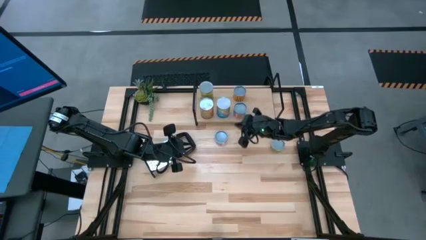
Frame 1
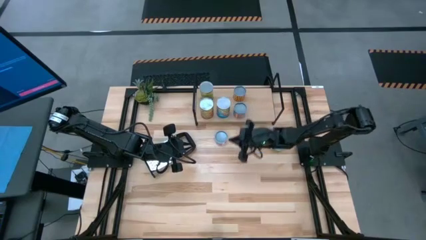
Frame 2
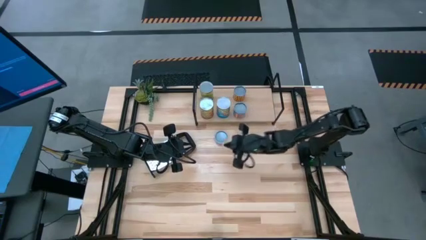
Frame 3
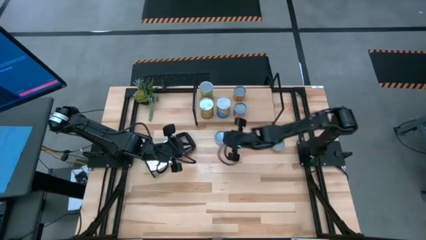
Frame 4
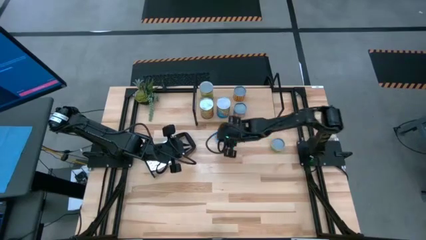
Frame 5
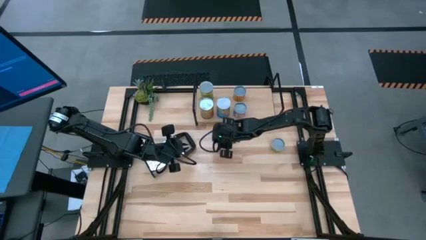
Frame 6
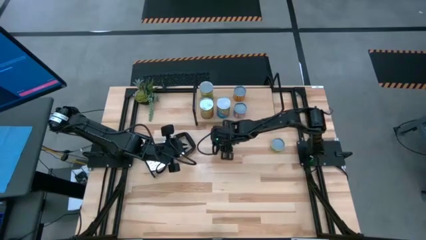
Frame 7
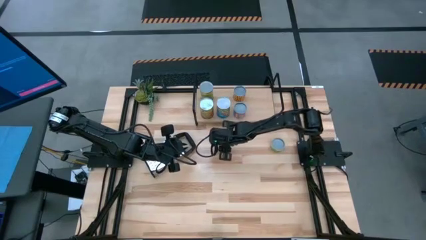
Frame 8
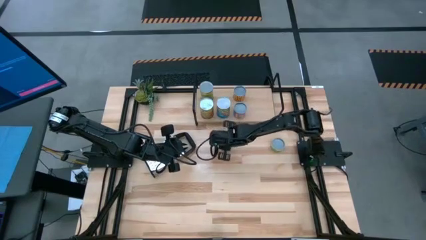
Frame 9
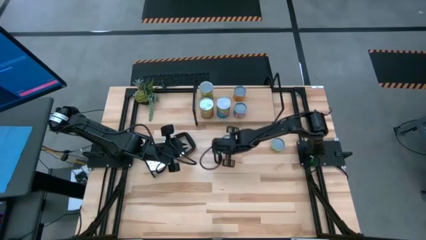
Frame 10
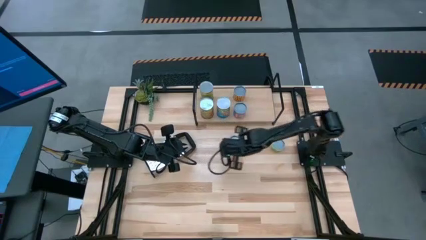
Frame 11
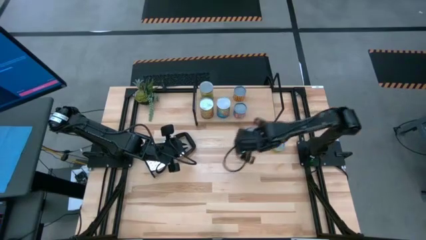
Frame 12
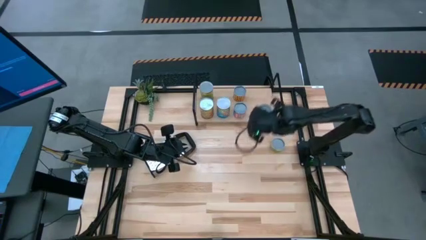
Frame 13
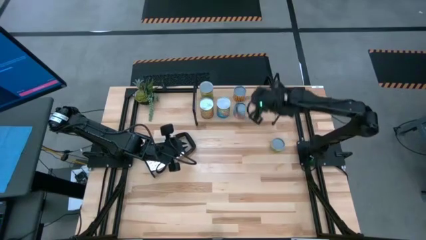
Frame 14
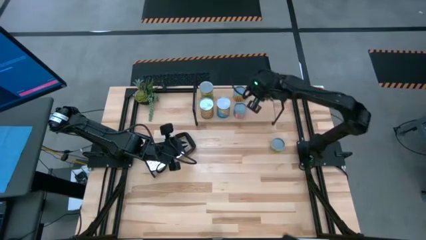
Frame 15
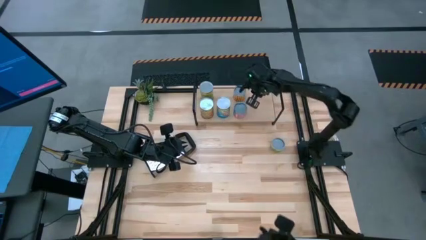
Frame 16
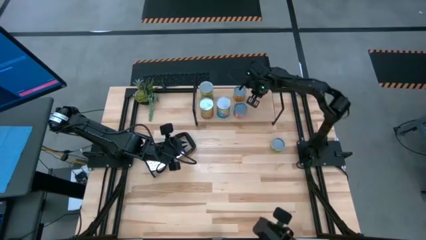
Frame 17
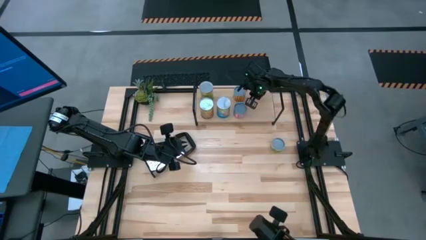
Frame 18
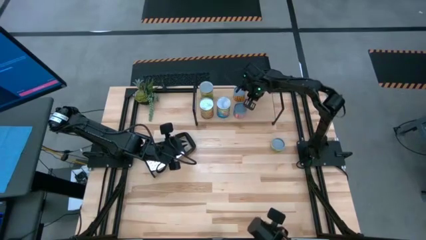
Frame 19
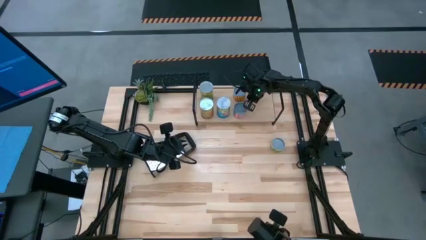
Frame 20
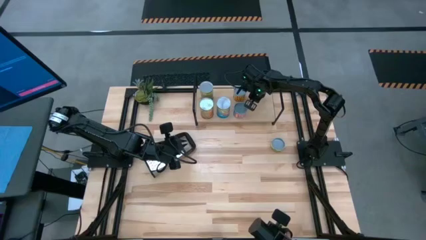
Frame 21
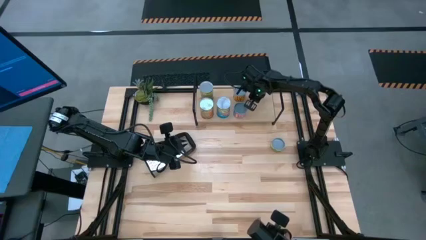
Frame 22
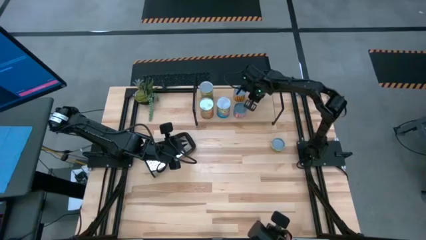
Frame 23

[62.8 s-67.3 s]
Task: Pick and place cans onto a shelf
Put the blue tuna can on the shelf

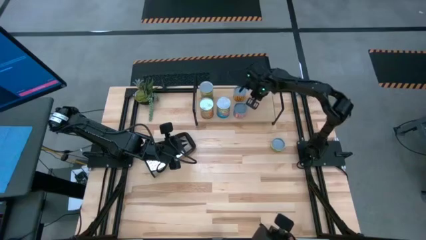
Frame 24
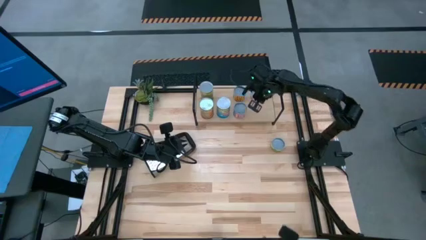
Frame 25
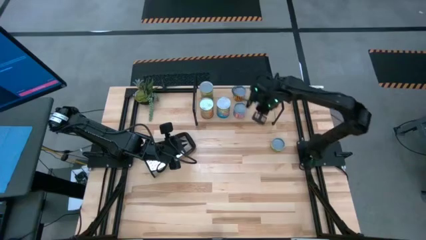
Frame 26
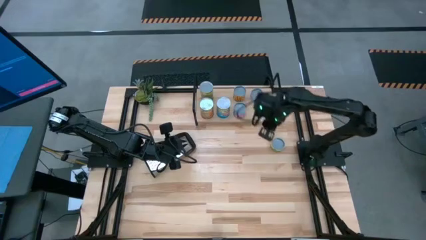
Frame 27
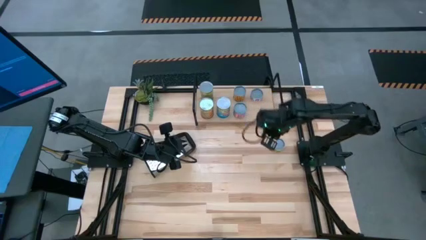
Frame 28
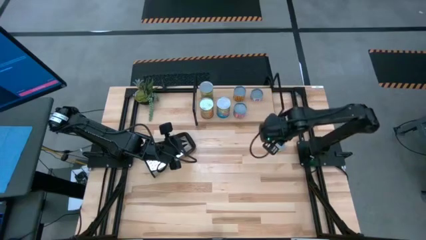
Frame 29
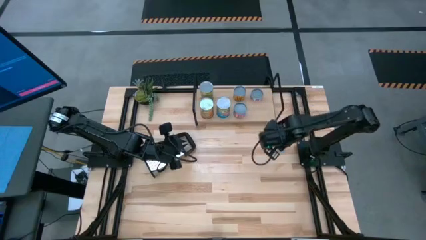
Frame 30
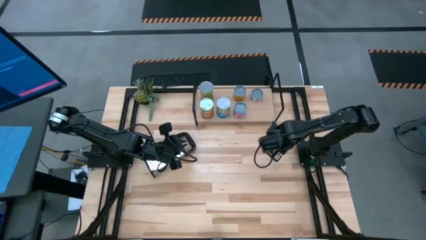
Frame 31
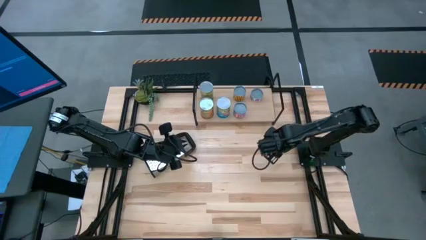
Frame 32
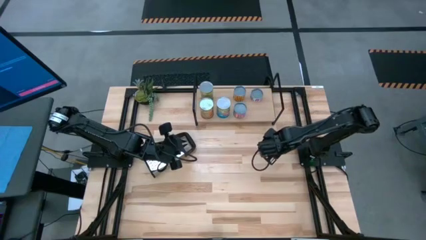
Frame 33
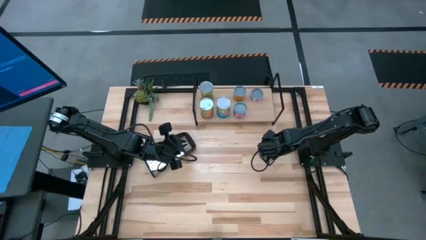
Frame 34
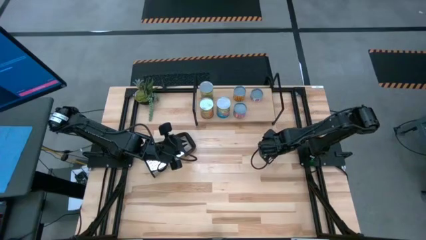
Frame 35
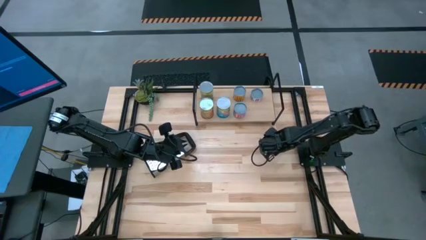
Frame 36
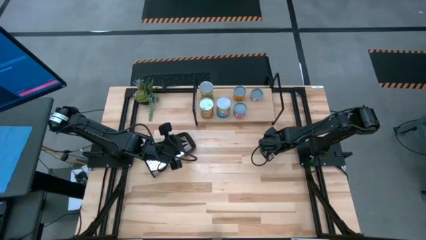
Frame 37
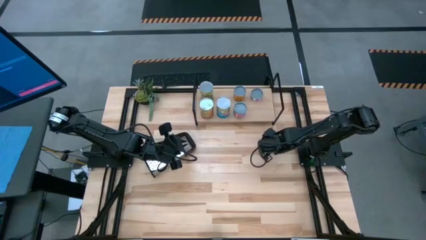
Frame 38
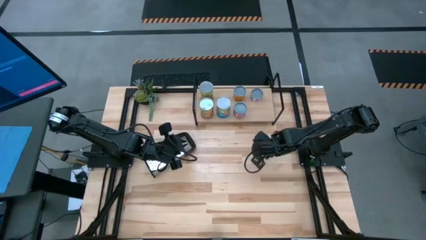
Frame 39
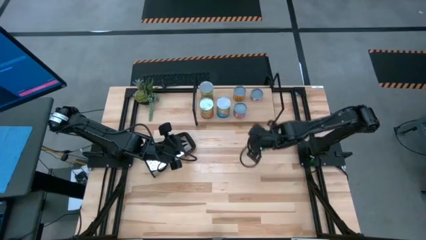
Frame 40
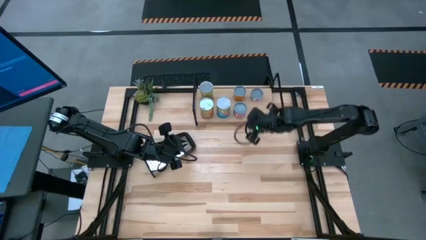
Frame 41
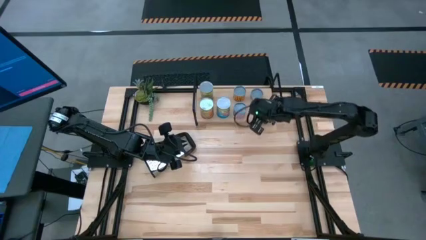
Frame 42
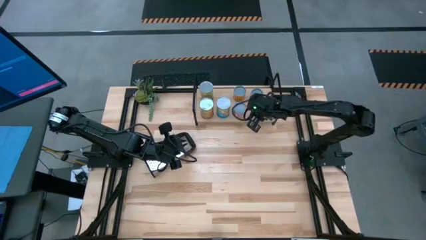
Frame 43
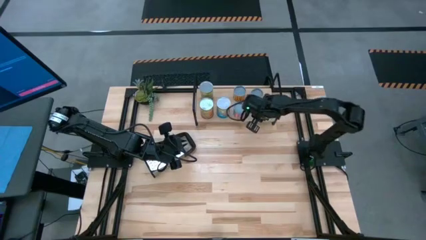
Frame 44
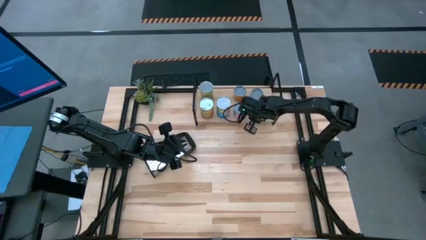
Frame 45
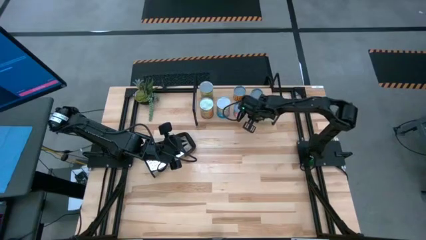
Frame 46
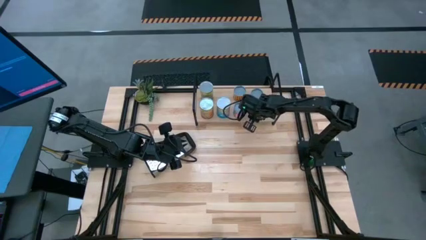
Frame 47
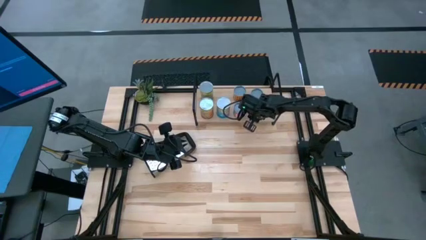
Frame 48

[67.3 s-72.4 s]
Put the yellow and green tuna can on the shelf

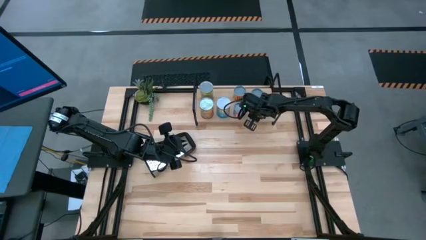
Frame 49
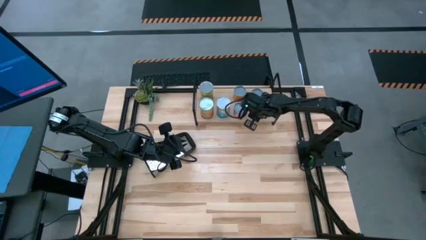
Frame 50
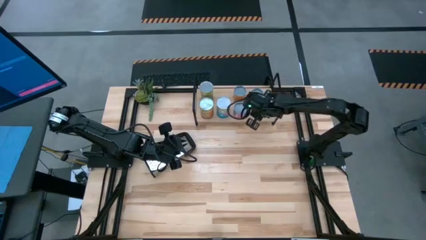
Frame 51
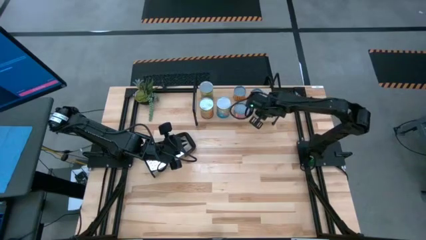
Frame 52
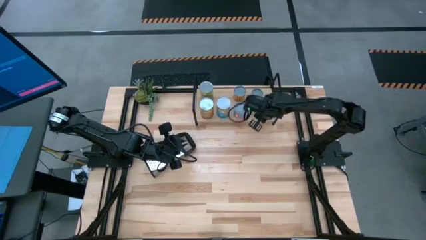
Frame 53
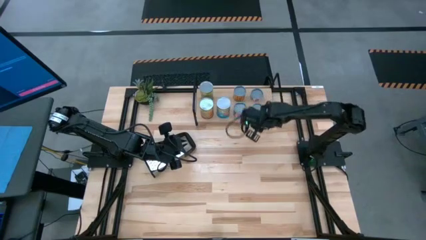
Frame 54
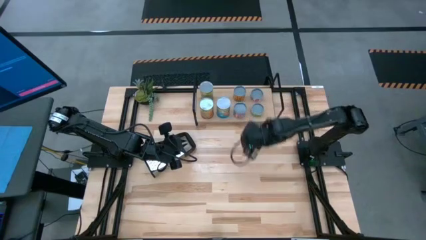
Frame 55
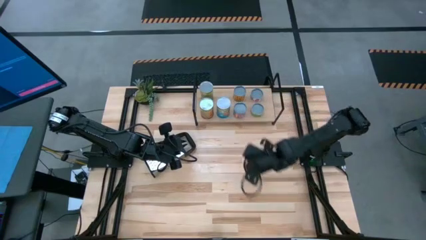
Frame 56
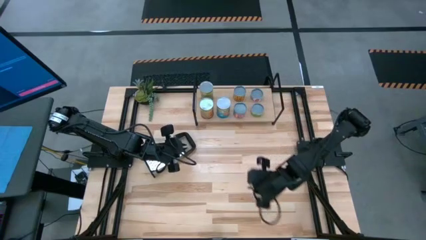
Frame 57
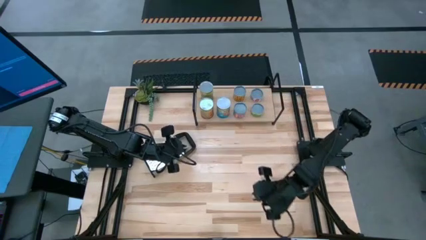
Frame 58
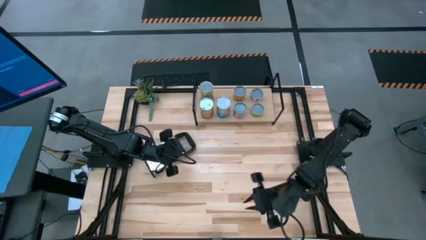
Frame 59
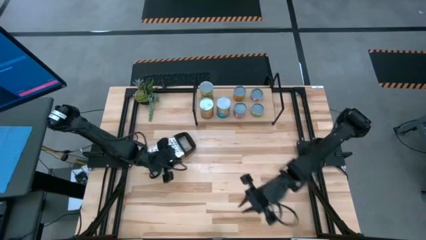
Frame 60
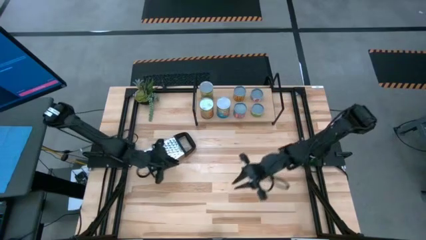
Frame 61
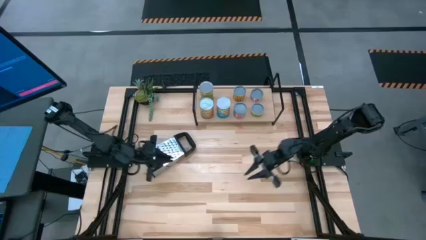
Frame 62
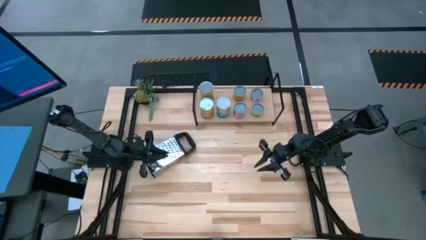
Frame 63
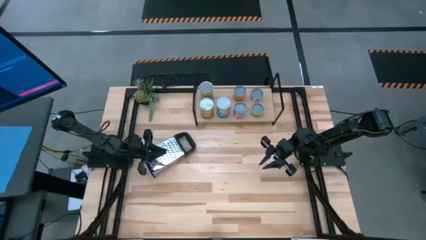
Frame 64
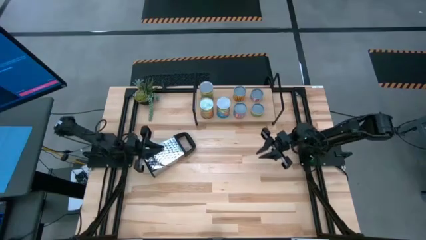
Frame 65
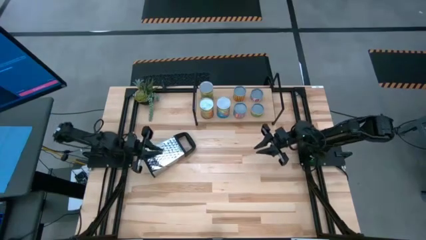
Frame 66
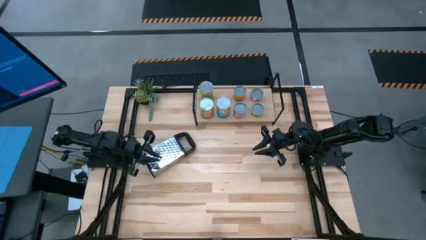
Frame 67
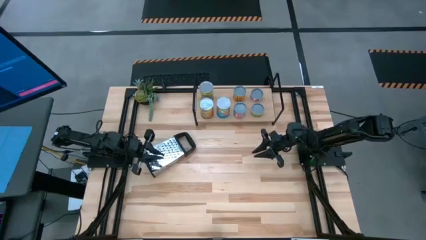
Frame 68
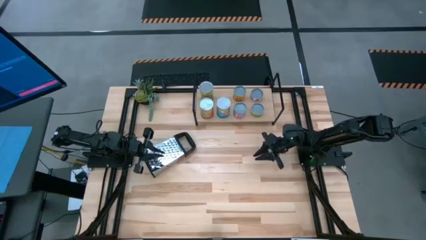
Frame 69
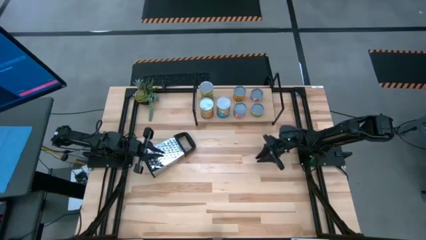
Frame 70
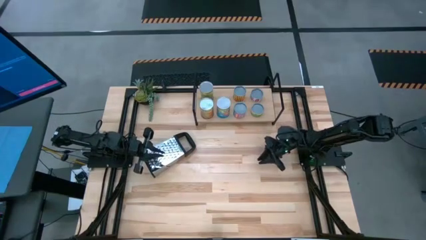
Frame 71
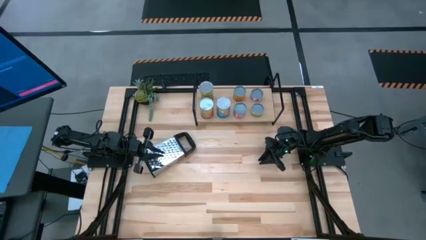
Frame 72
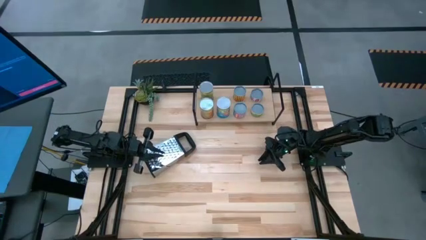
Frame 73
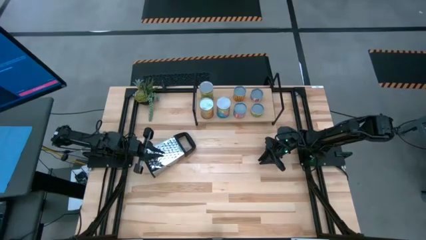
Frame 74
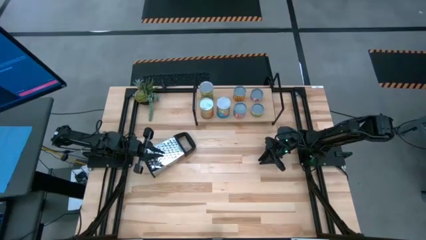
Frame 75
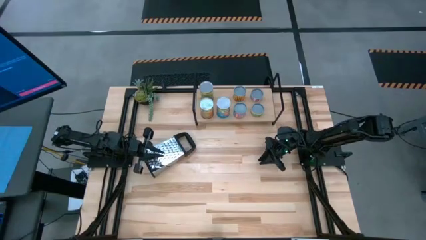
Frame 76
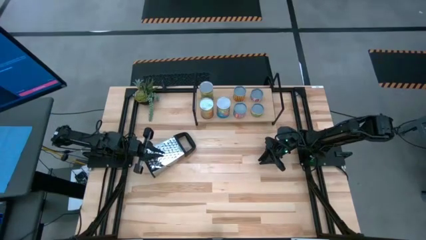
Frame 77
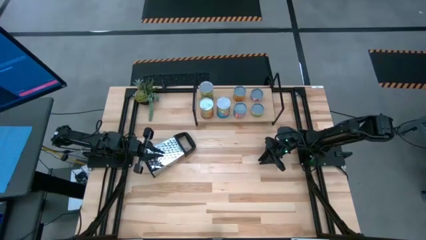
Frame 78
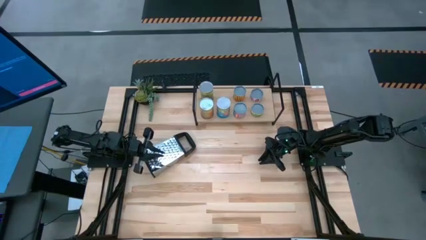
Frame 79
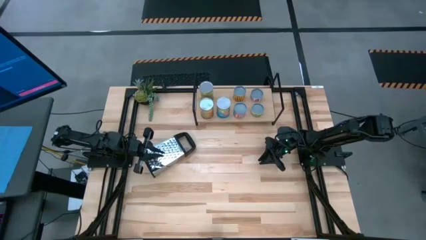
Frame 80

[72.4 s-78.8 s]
Return to Home Position

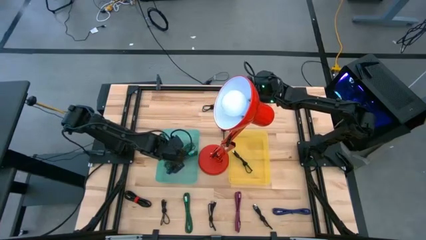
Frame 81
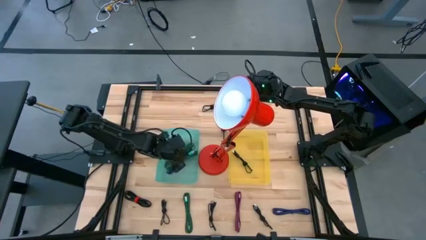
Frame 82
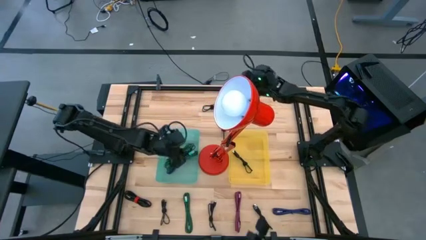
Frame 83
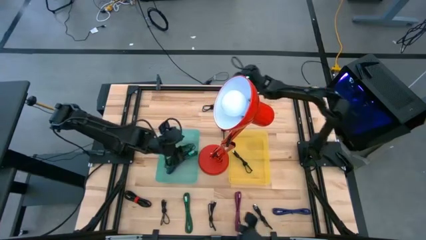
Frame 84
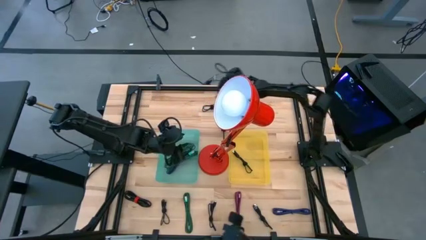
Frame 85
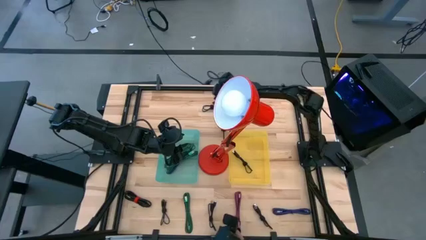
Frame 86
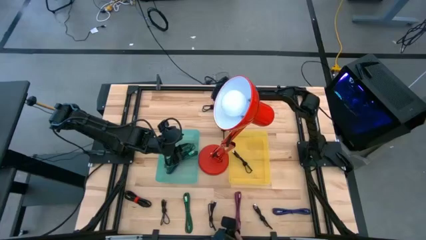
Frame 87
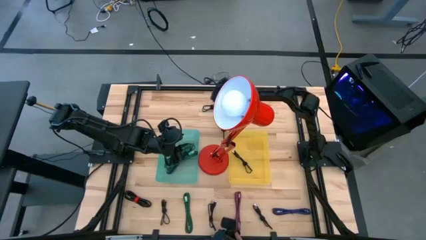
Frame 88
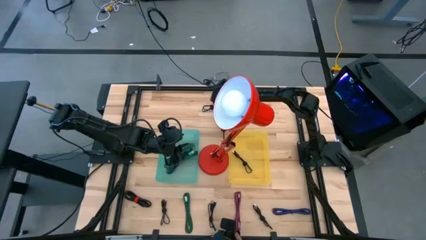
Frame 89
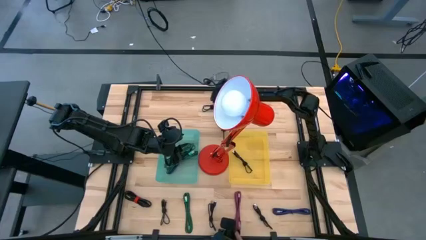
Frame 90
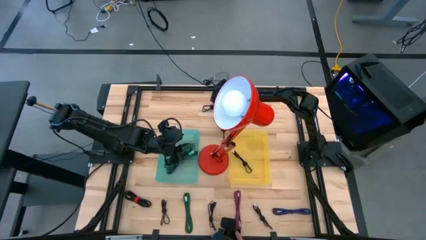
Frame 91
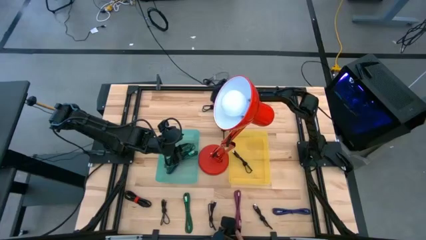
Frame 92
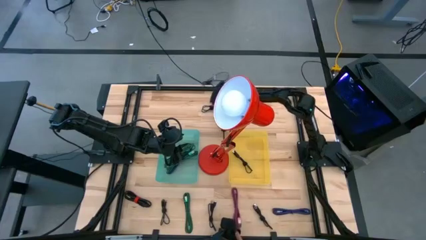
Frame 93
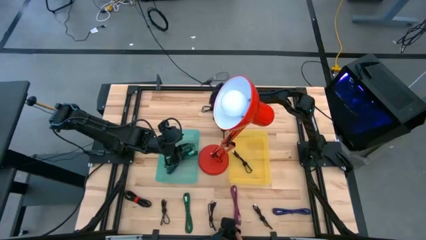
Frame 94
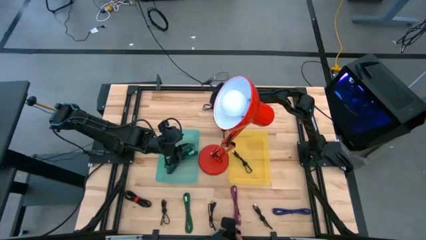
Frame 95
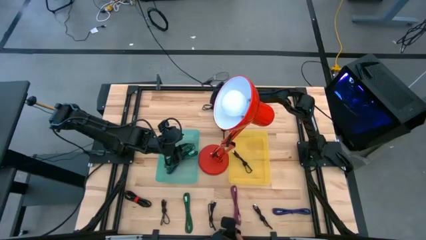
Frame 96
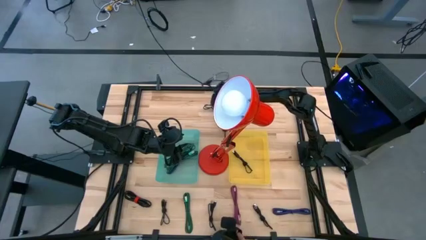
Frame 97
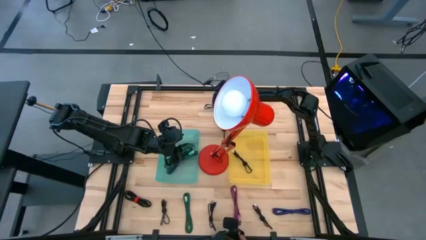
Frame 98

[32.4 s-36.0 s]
Task: Pick & Place USB Port
Put the black charger cable into the yellow bin
